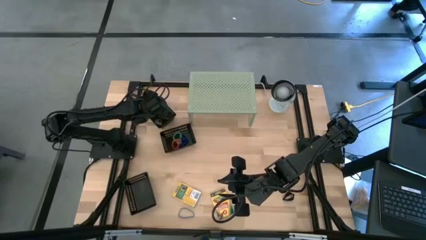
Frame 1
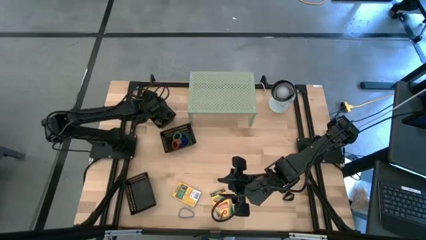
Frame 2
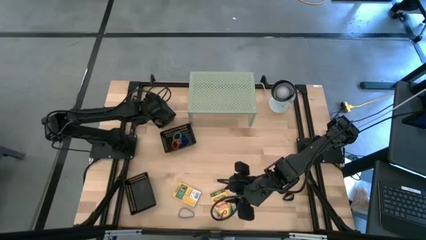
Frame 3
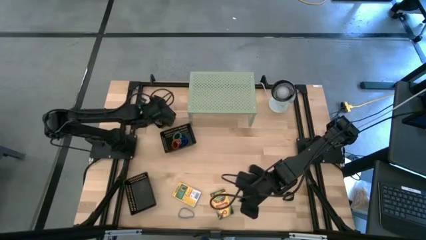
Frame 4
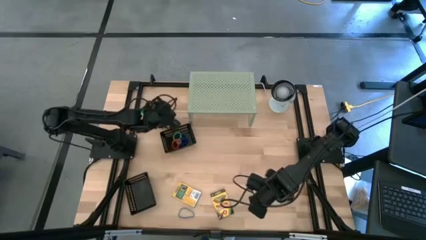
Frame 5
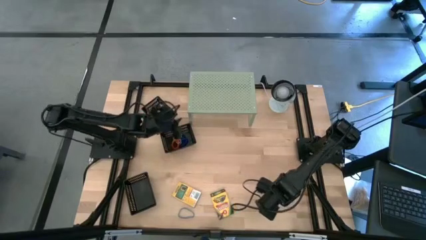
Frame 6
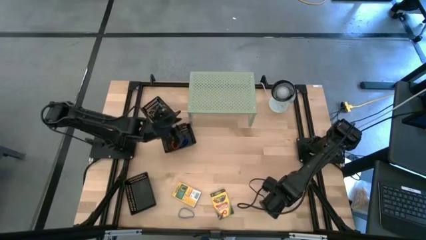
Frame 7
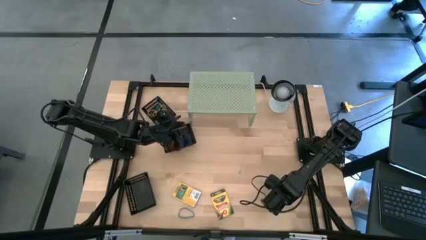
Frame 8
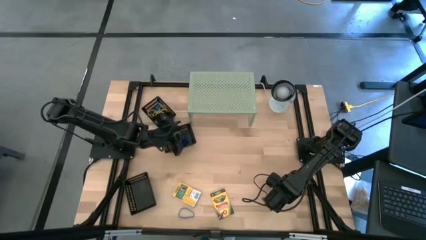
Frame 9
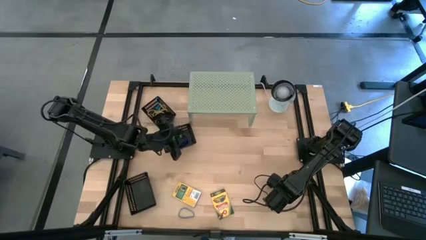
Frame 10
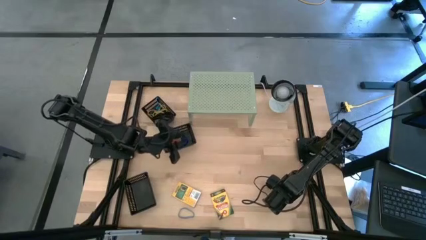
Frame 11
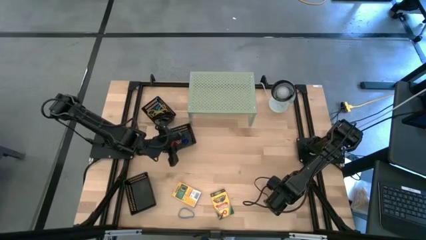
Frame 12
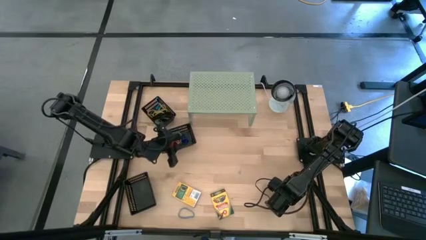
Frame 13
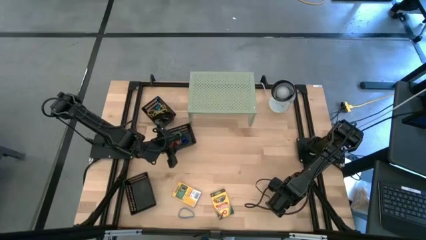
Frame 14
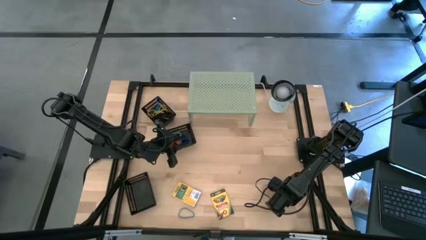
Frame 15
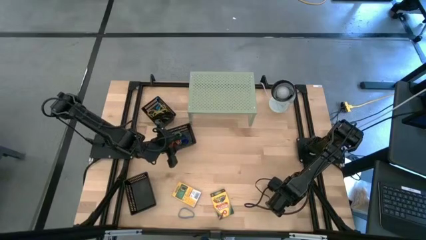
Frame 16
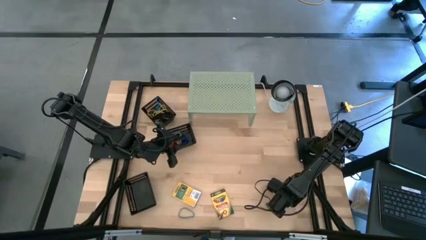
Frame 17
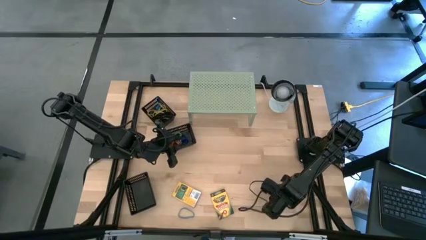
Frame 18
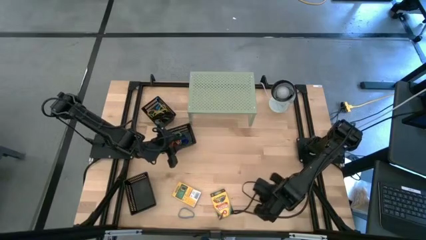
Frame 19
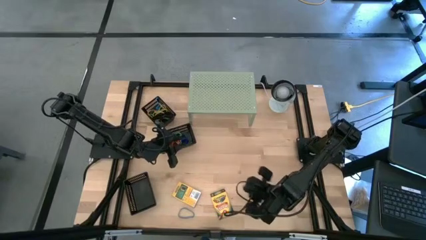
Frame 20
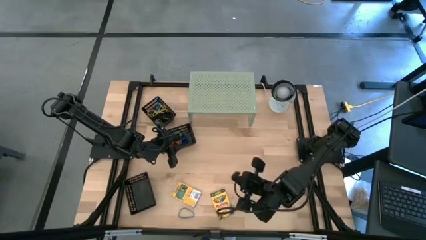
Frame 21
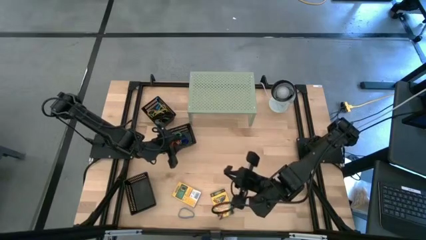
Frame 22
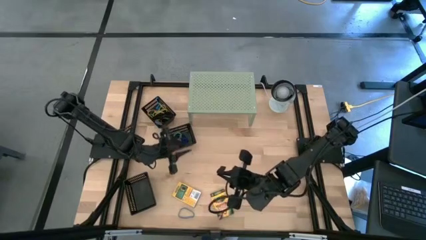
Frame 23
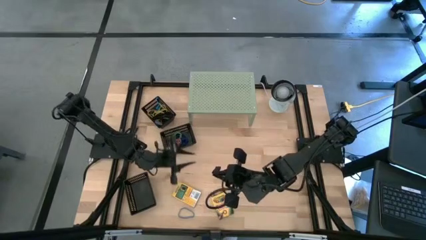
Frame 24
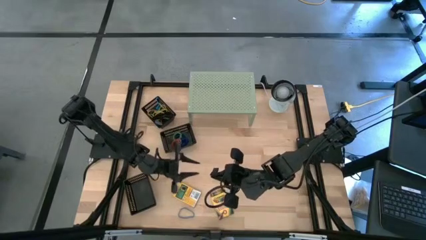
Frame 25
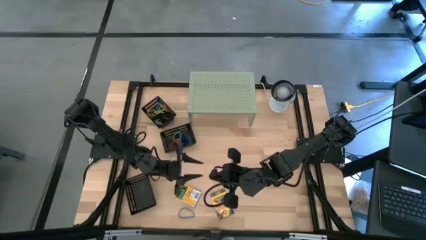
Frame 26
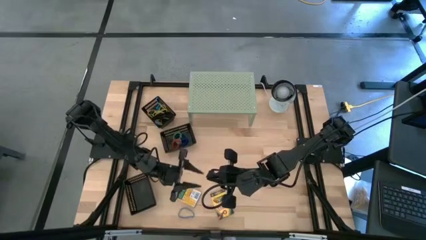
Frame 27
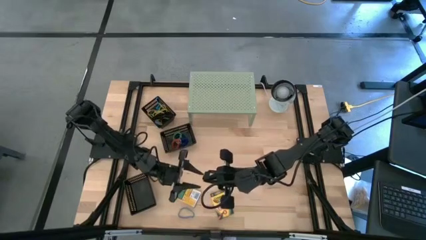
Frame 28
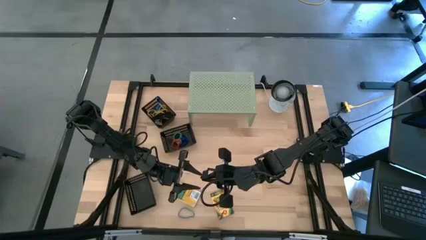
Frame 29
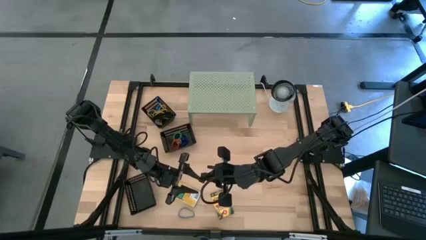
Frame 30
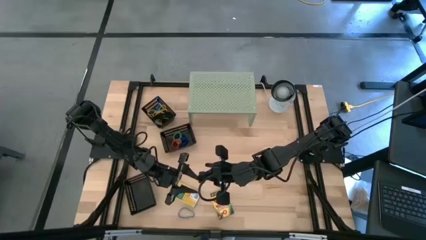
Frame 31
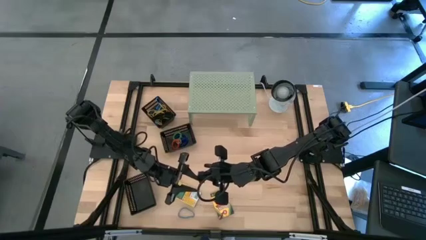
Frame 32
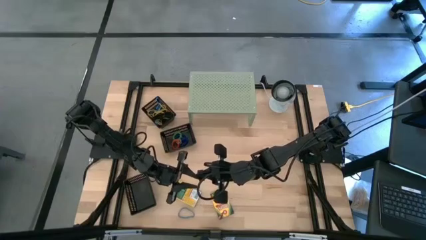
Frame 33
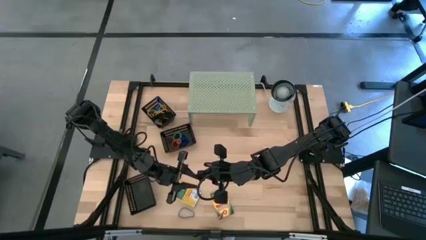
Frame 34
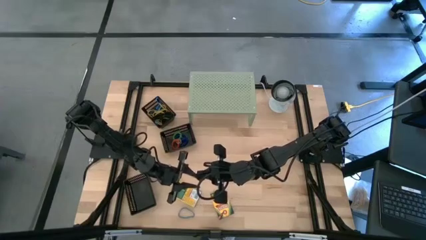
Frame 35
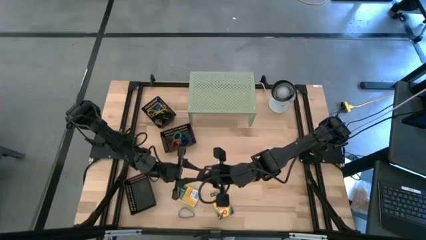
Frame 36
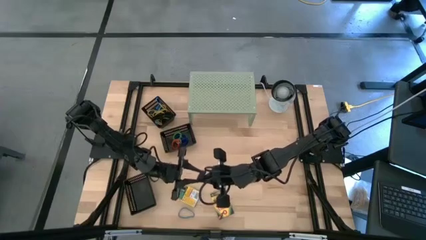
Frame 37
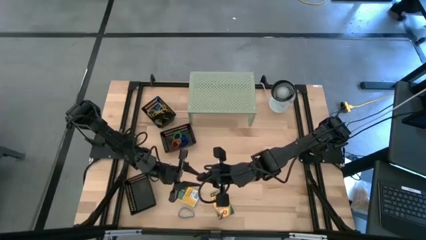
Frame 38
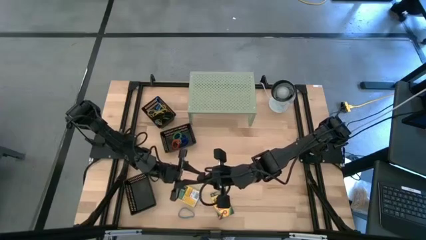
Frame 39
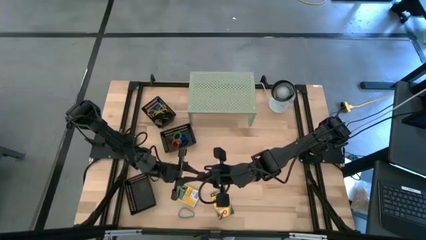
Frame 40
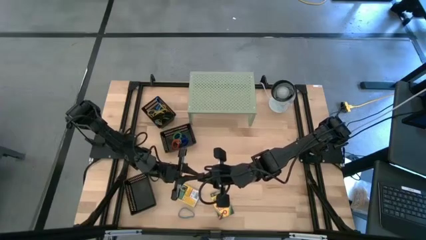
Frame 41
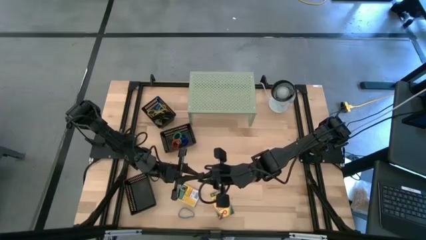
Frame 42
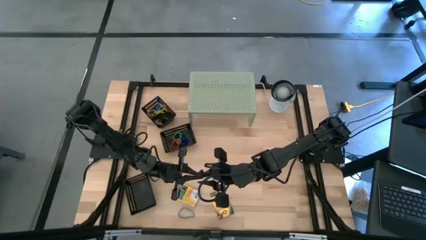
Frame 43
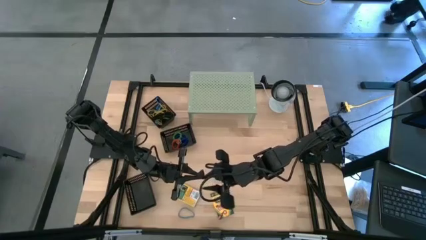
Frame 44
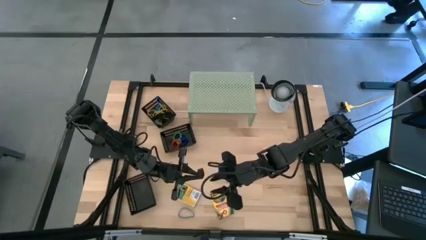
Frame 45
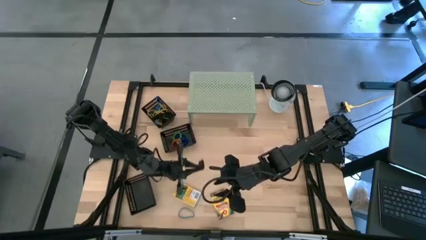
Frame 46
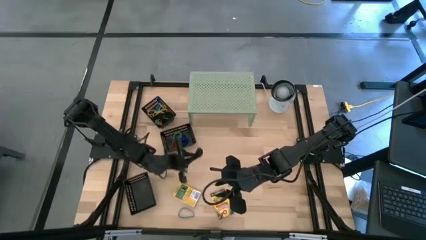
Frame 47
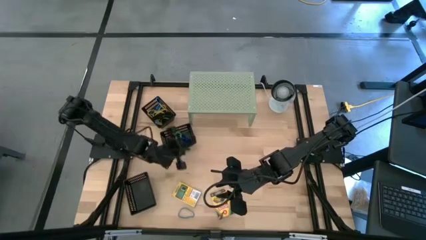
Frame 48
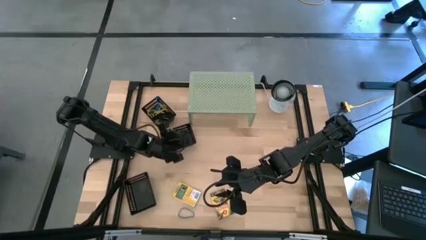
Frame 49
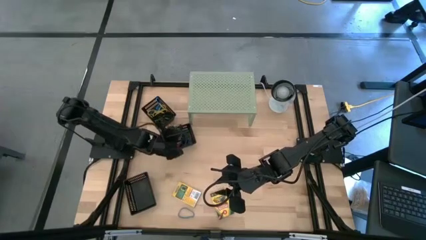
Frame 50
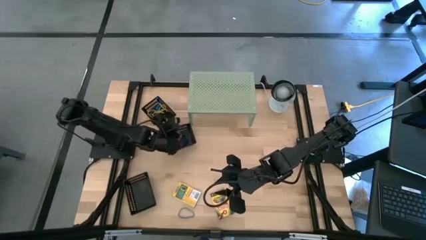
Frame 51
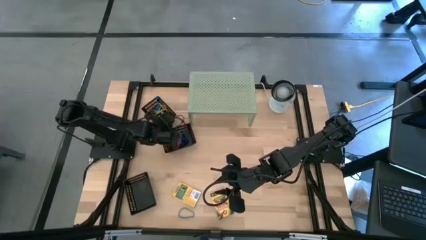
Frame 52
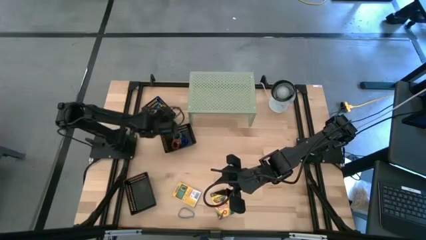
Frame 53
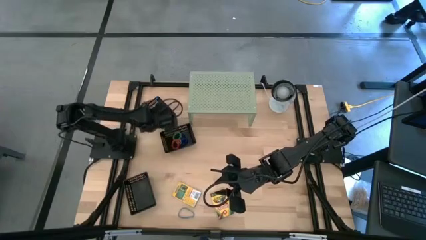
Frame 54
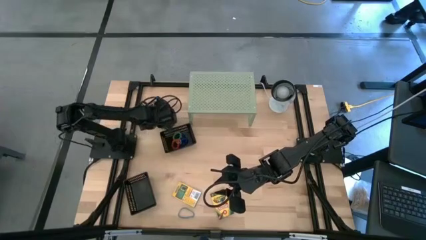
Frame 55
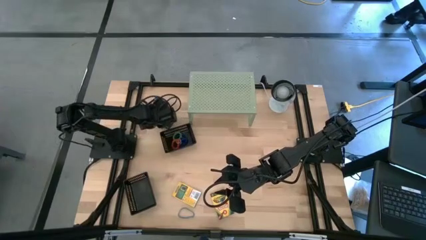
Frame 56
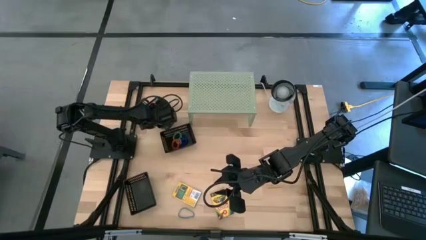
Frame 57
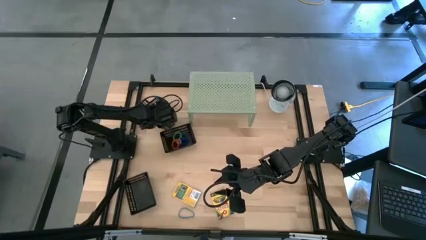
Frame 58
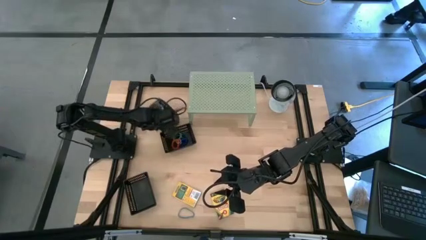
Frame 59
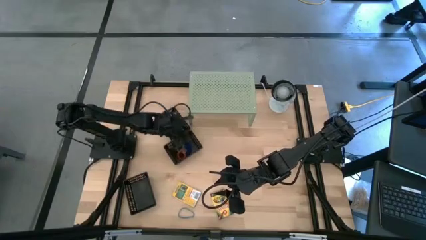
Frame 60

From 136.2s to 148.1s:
Task: Pick & Place Office Desk Supplies
Put the black rubber band into the top black bin

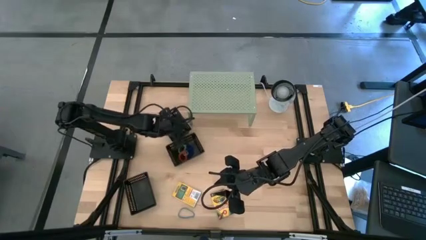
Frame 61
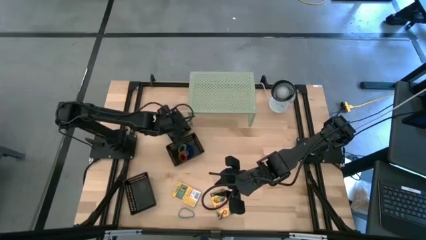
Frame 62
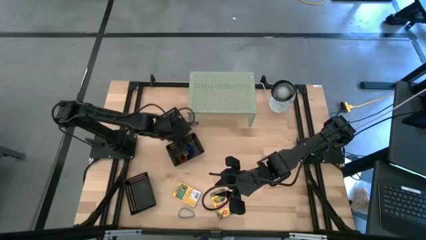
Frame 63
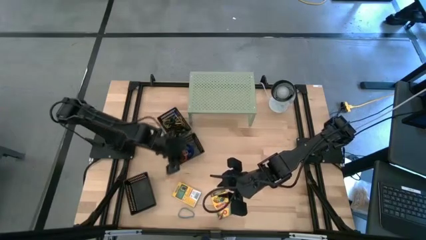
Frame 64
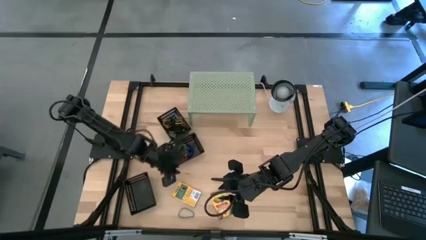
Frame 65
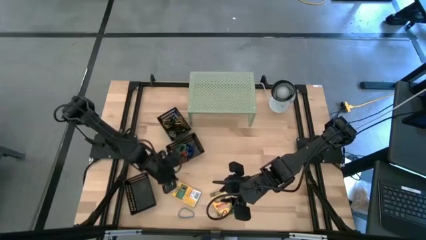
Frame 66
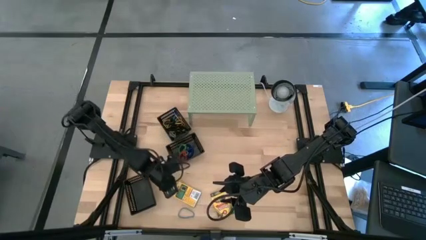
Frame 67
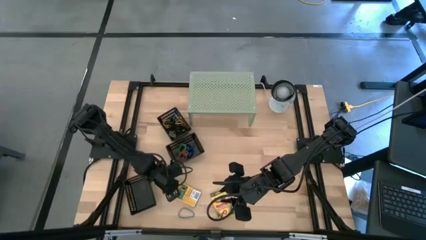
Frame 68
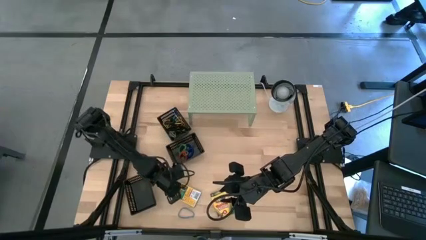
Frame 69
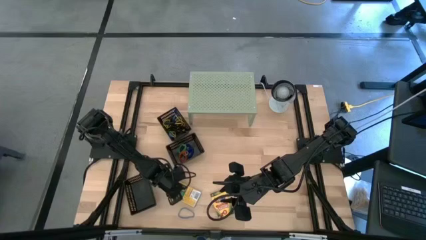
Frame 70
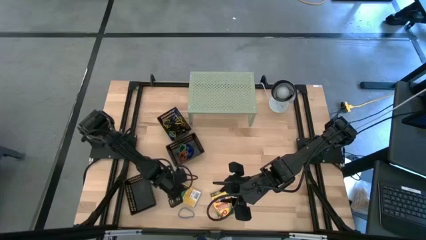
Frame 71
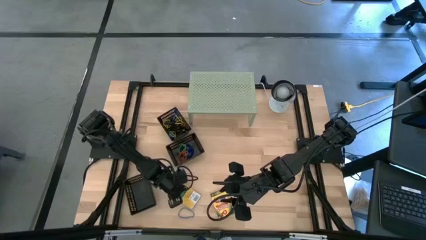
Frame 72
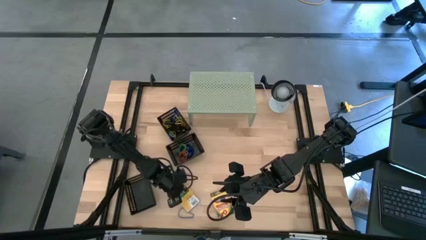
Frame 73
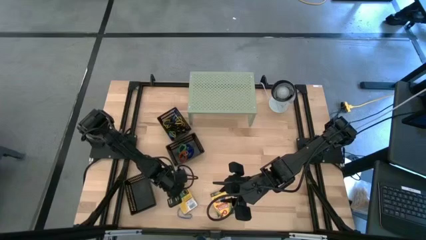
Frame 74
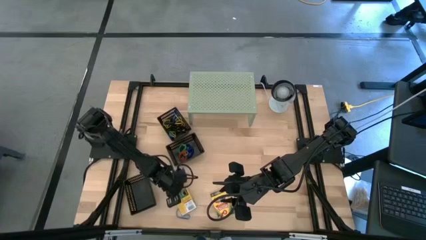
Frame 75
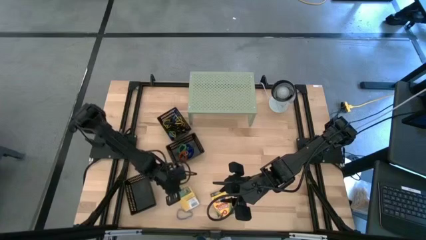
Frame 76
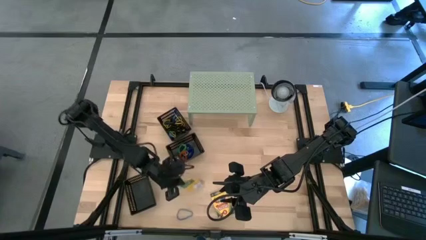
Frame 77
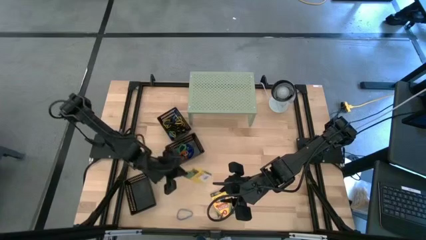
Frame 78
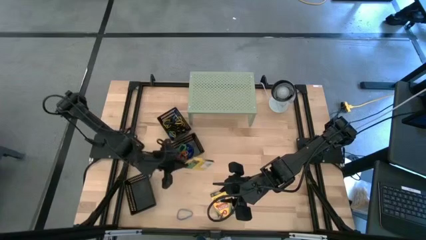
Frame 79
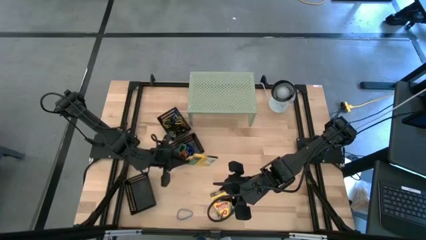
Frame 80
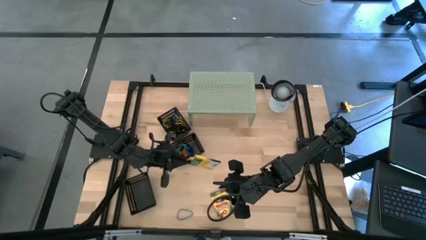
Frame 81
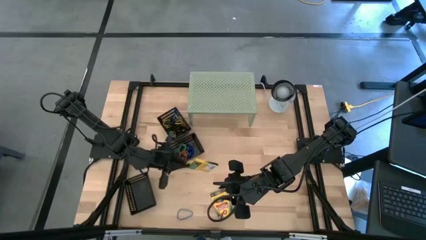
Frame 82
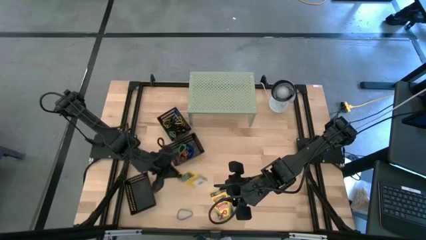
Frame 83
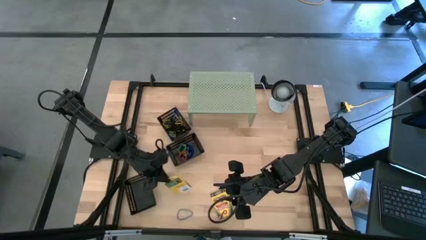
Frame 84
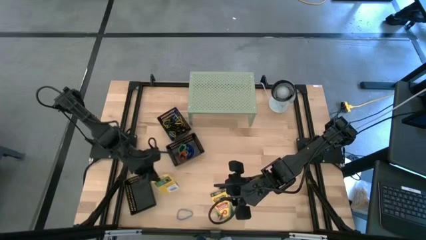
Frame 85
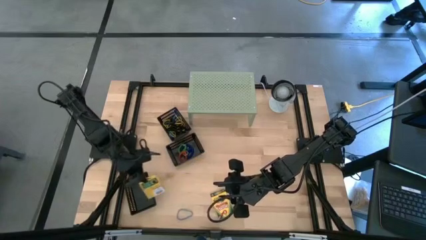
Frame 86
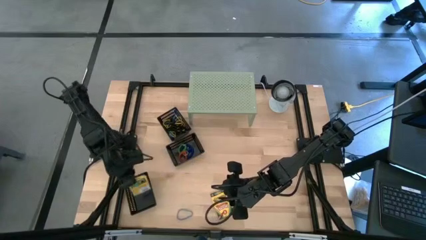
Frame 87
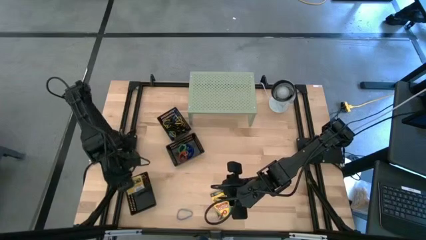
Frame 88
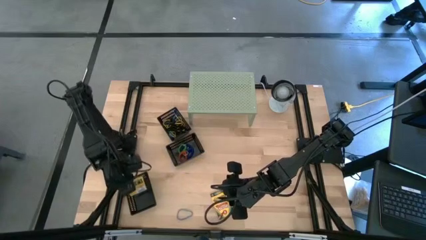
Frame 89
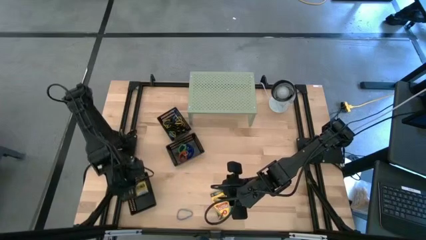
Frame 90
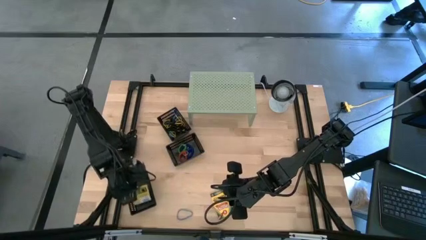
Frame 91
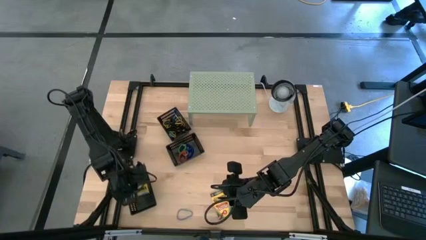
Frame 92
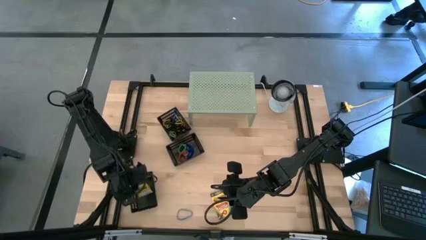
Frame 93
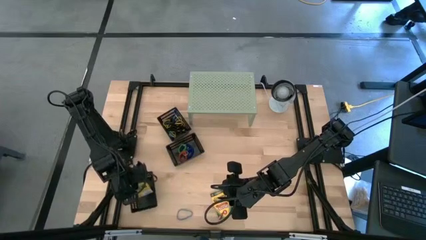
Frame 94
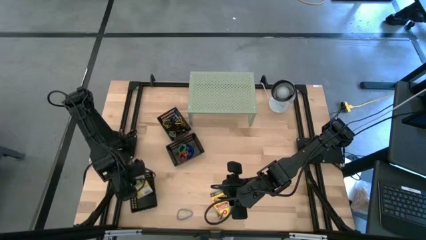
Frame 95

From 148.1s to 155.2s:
Put the left pack of crayon into the bottom black bin
